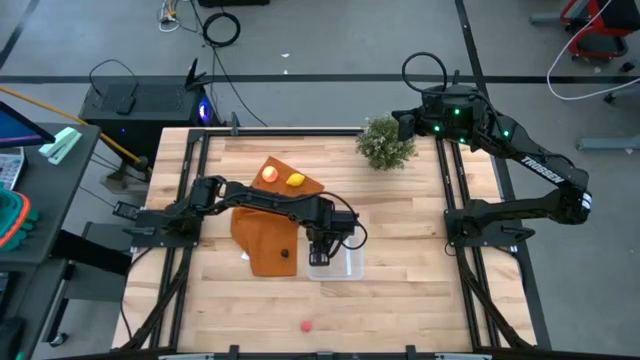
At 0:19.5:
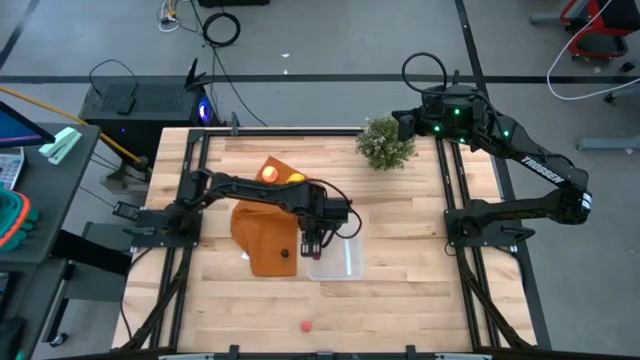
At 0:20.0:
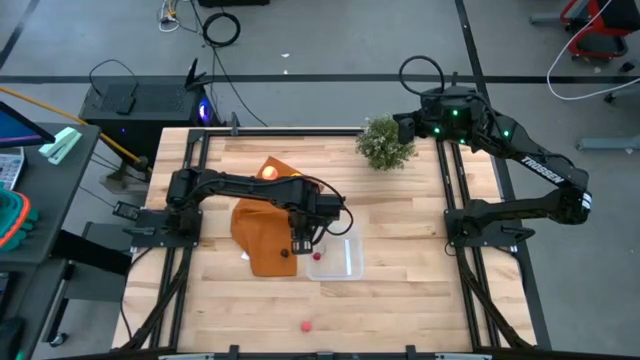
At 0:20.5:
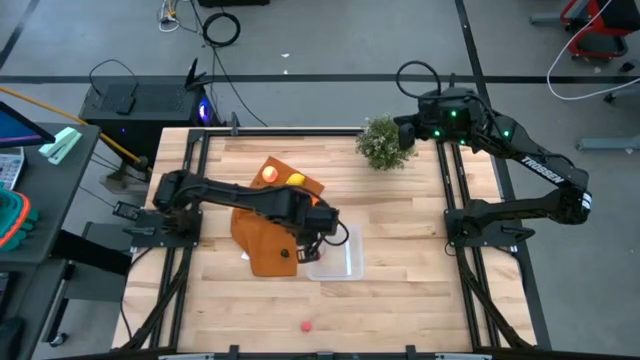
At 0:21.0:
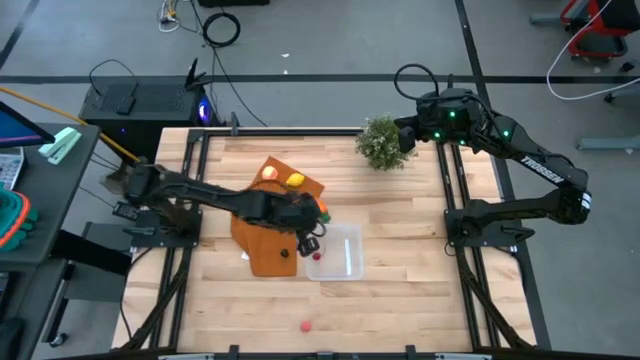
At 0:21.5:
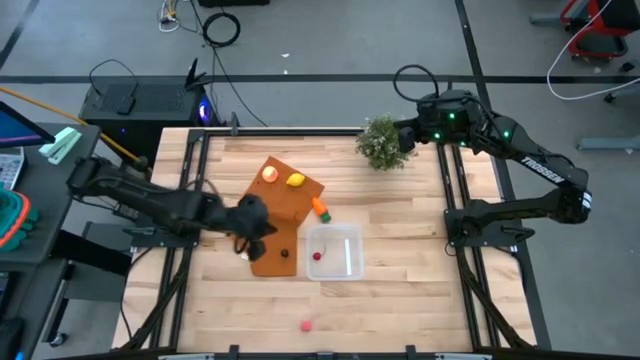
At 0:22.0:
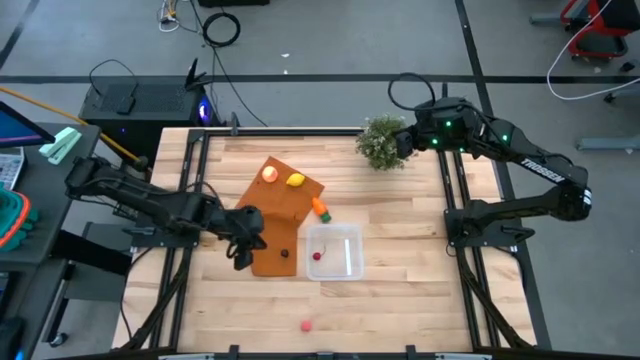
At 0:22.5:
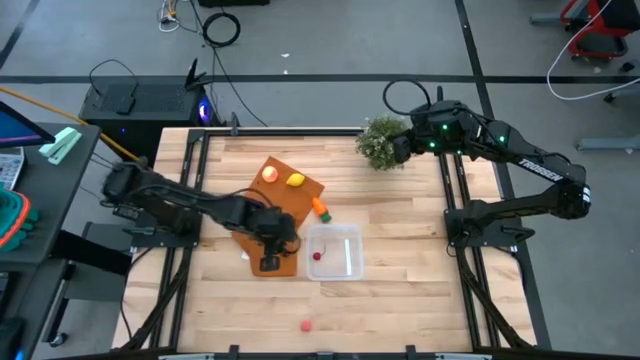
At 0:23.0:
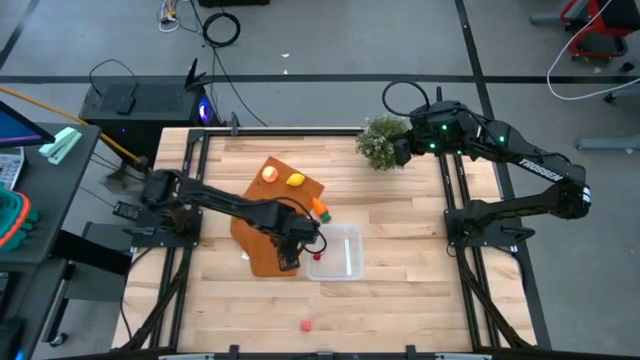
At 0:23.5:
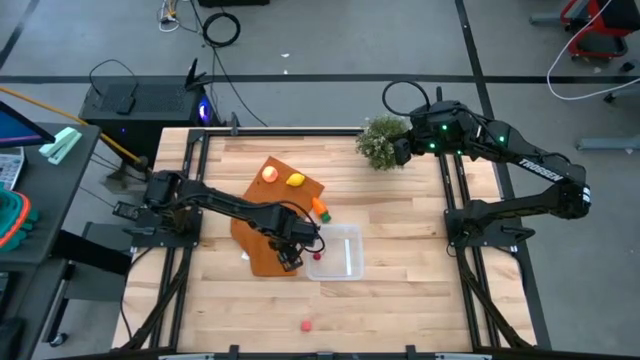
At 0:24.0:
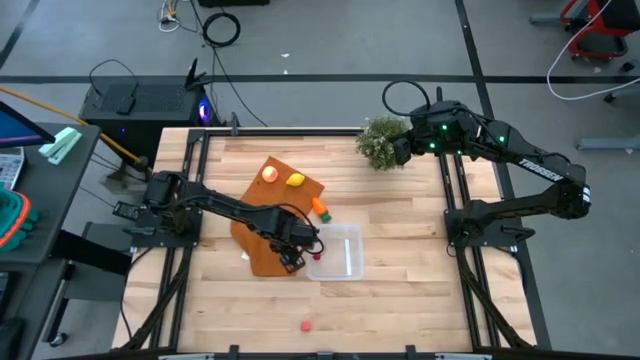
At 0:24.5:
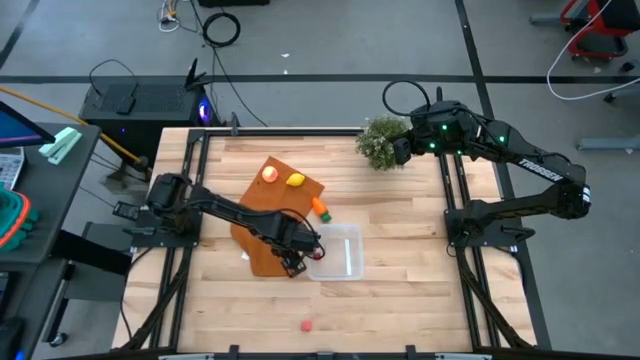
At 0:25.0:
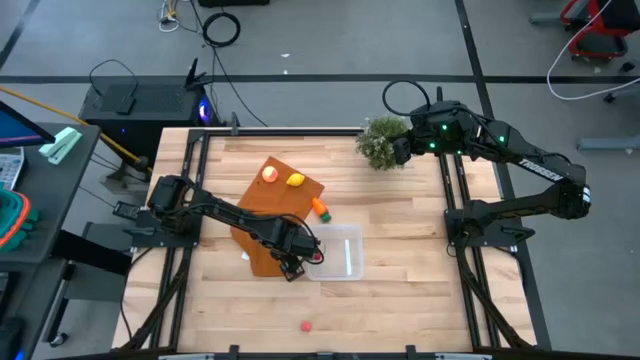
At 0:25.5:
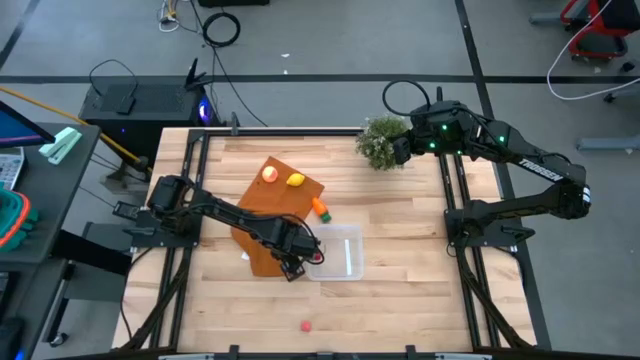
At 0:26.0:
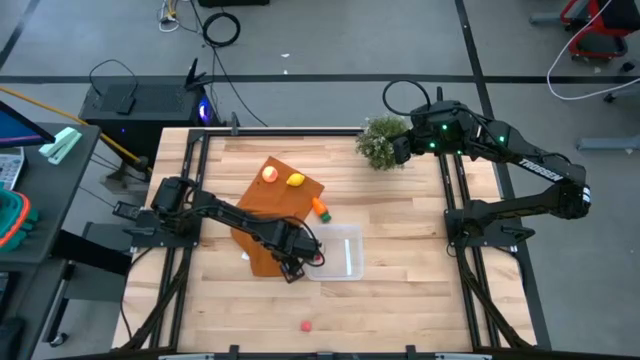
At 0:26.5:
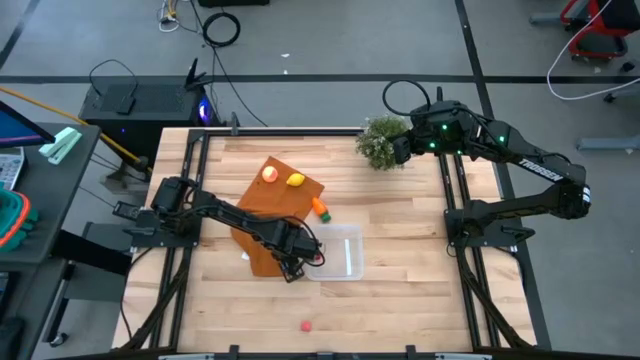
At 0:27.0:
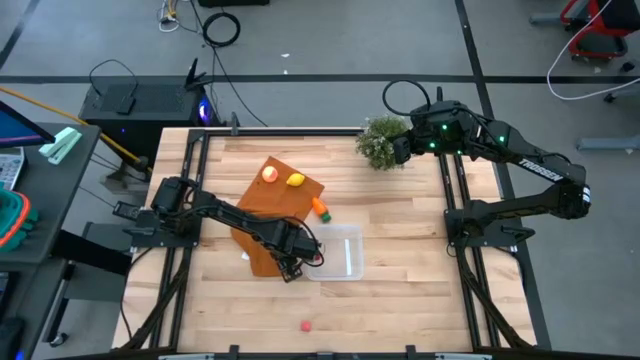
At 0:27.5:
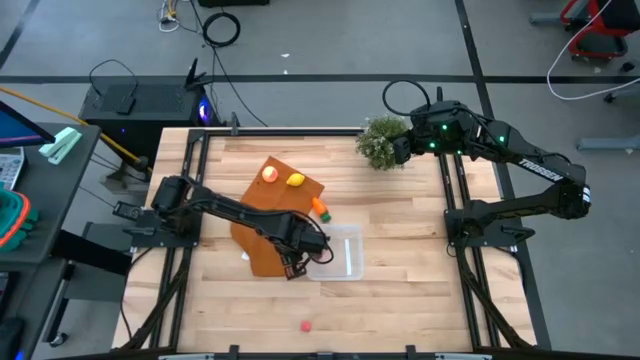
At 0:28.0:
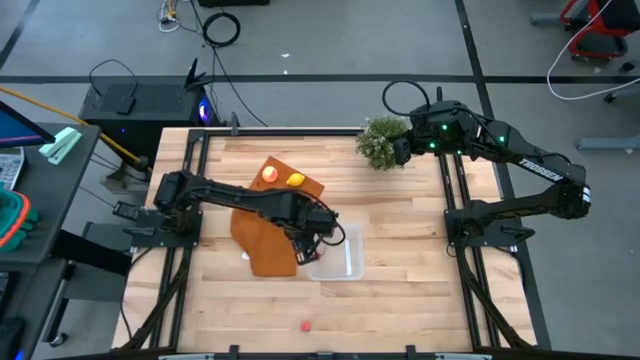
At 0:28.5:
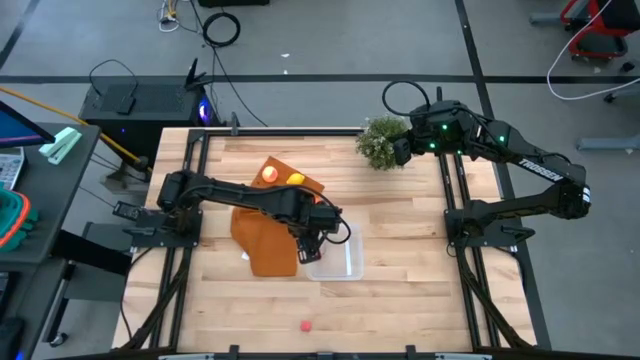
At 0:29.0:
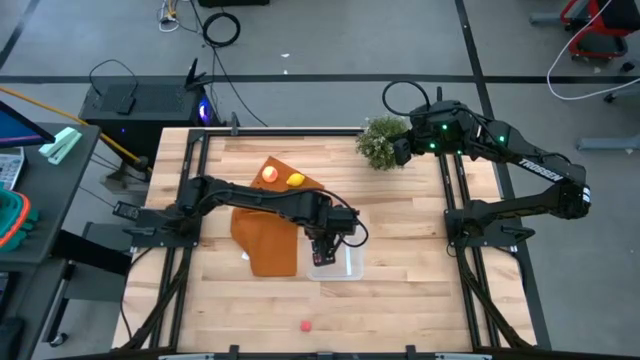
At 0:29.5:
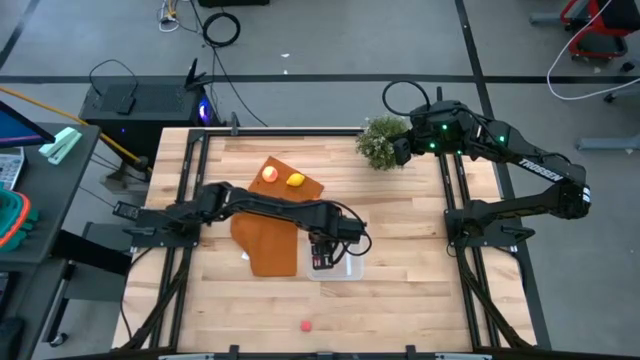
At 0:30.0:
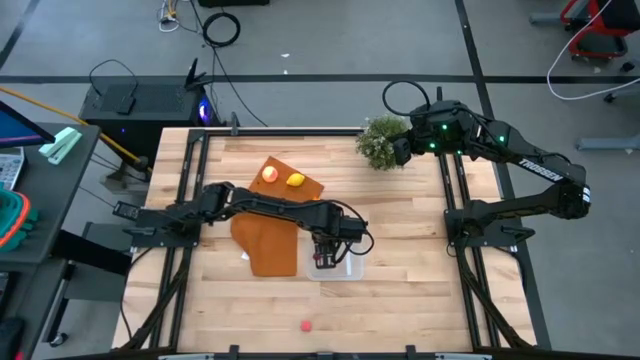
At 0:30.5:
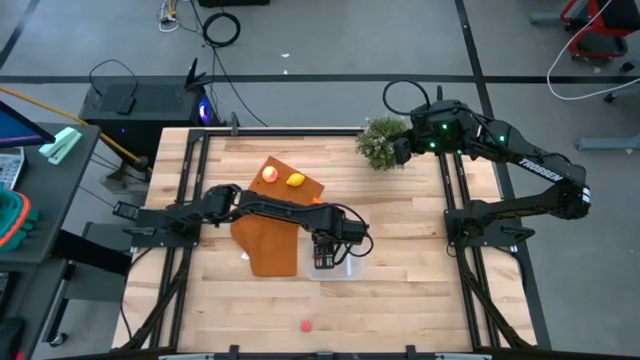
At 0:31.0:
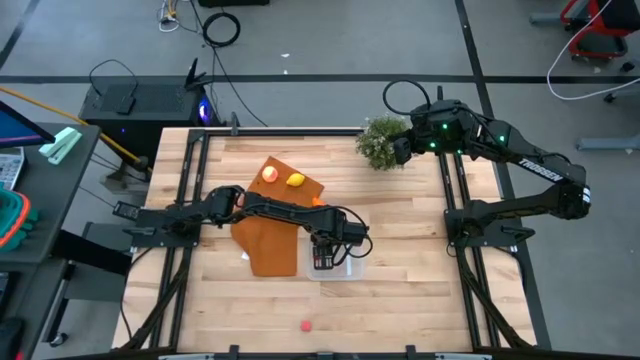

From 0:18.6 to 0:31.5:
Task: Pick and placing Produce into tupperware
Put the black cherry into the transparent bin

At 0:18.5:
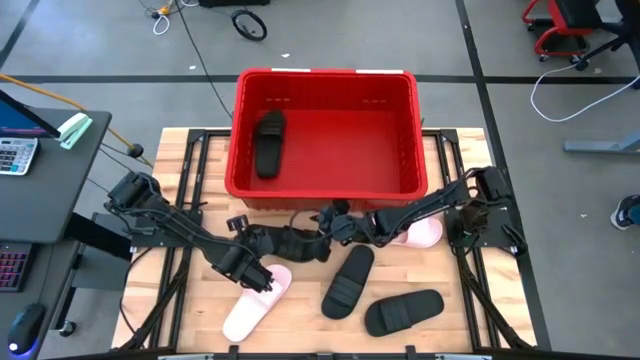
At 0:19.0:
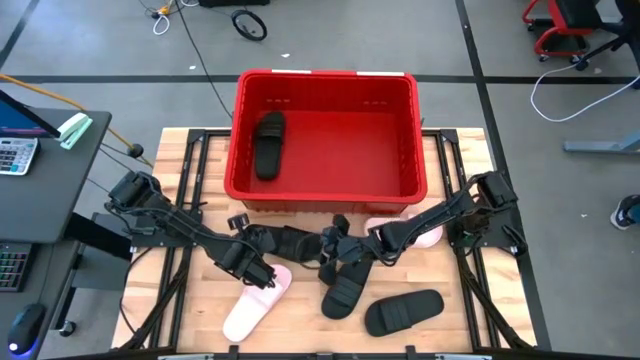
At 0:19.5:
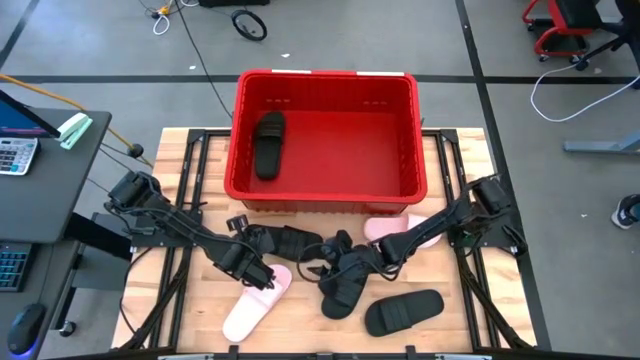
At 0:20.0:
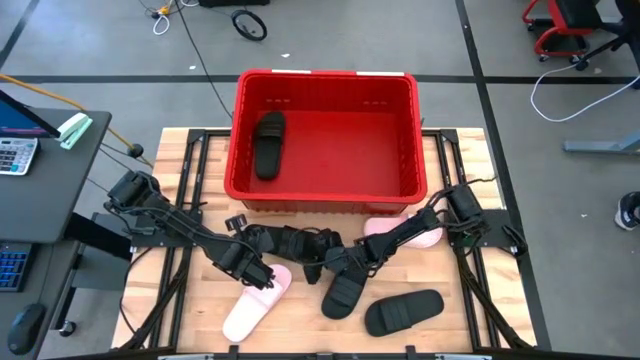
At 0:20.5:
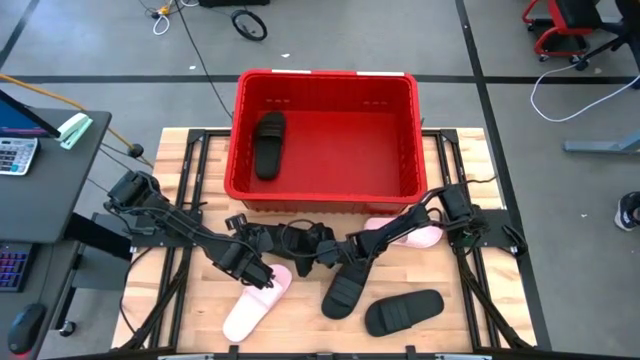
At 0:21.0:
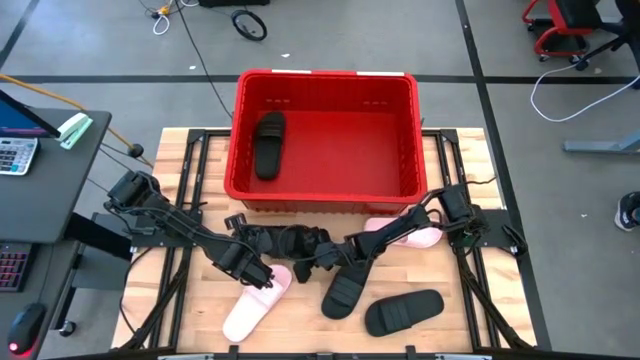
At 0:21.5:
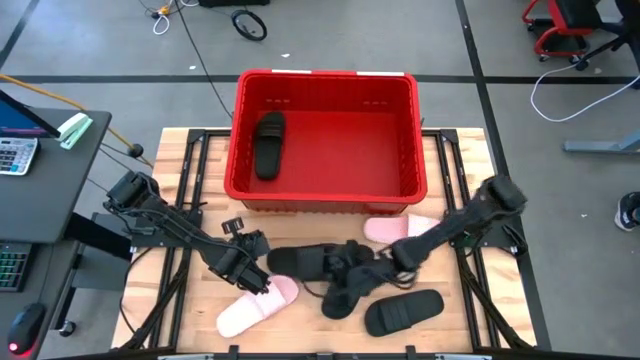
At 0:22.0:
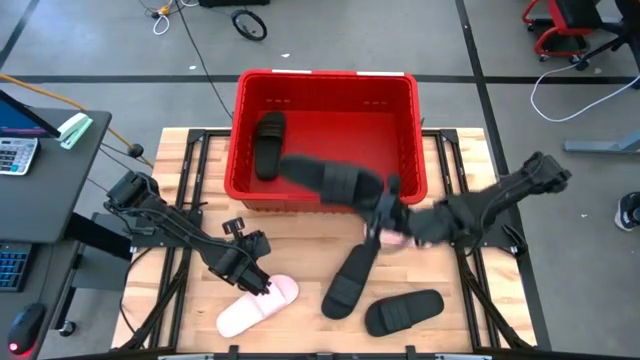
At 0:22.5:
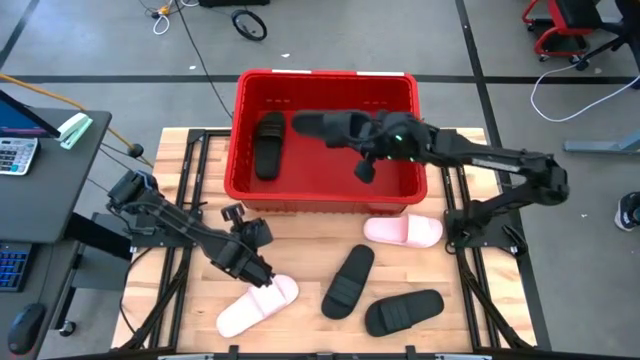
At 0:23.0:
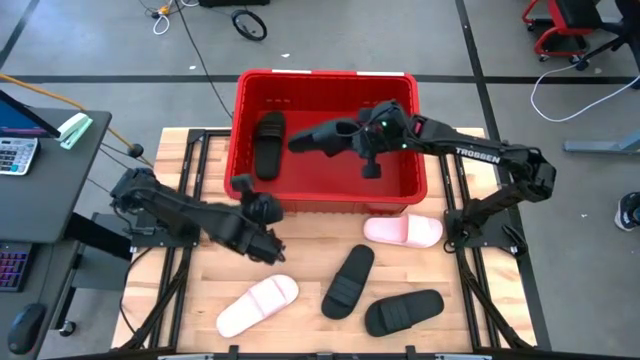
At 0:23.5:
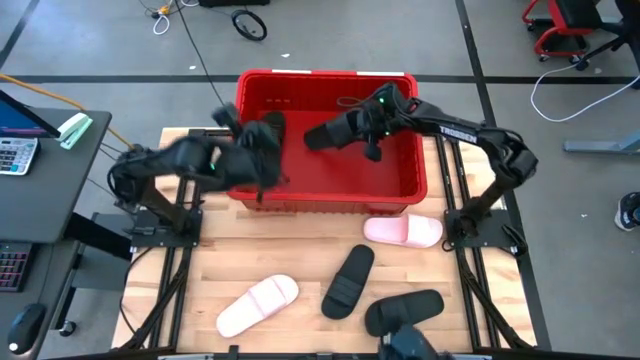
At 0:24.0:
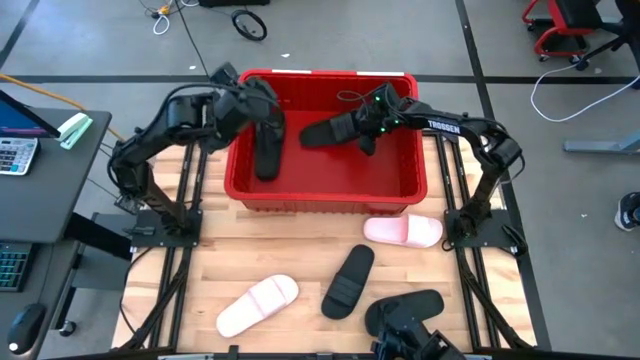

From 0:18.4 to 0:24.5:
Task: Pick and place slides into bin
Put the black slipper into the red bin

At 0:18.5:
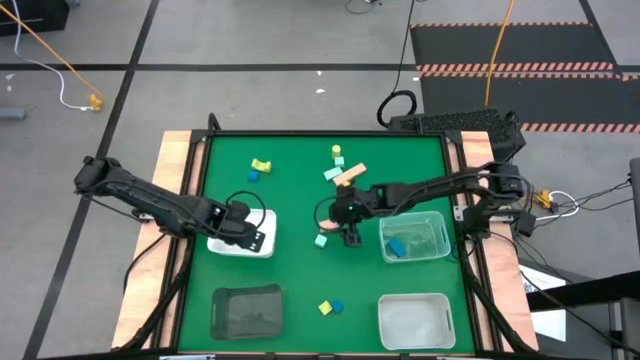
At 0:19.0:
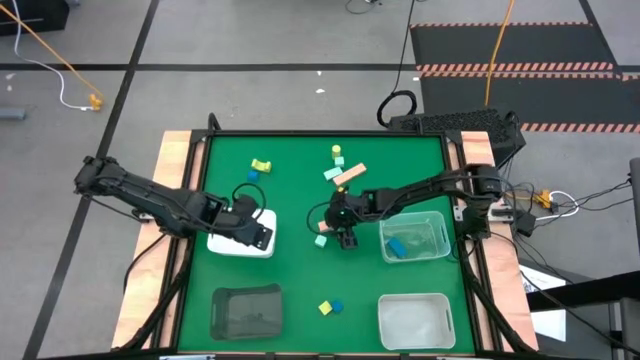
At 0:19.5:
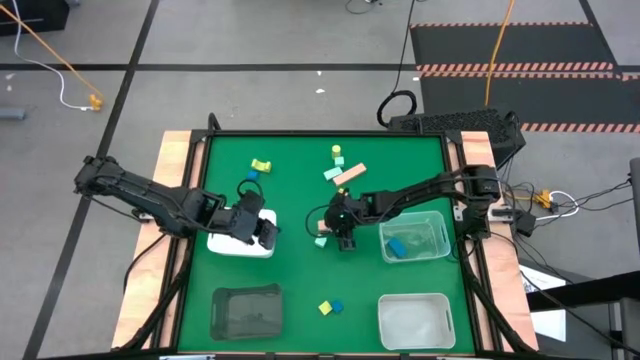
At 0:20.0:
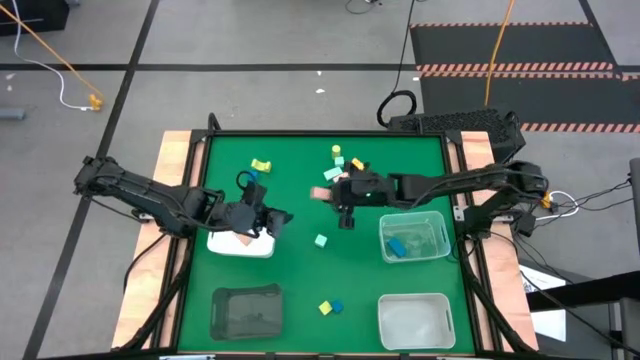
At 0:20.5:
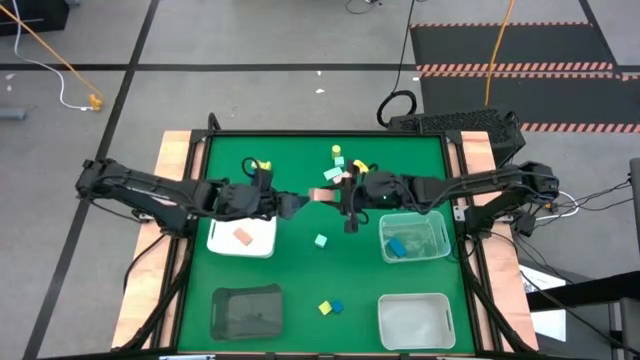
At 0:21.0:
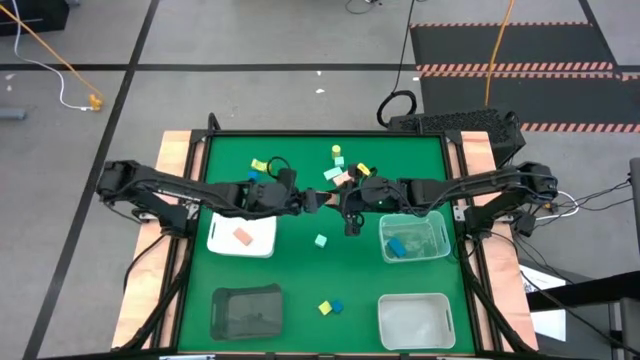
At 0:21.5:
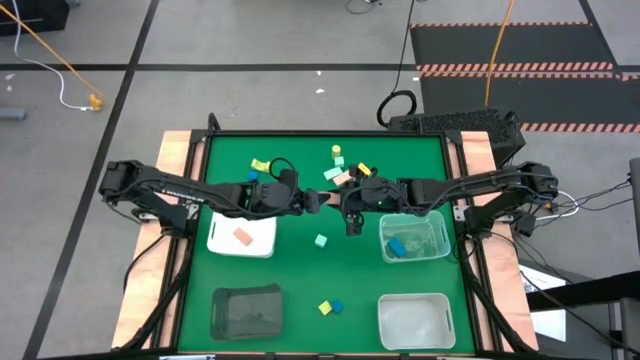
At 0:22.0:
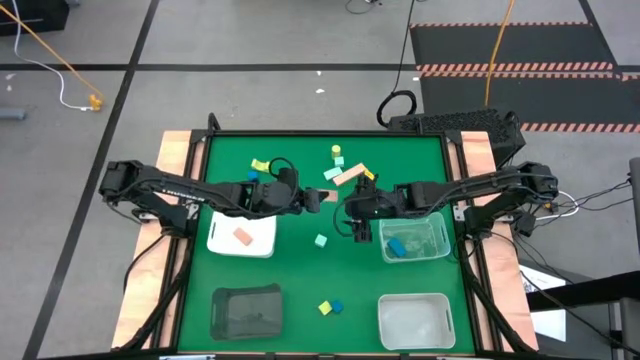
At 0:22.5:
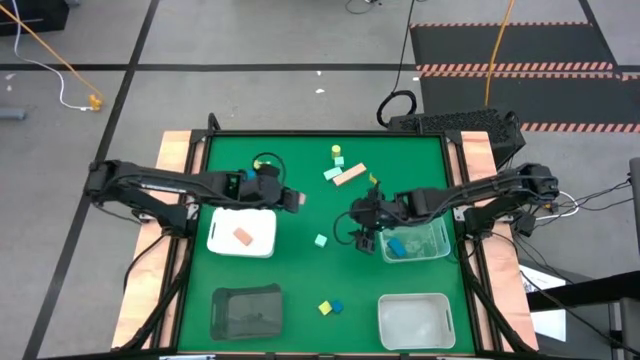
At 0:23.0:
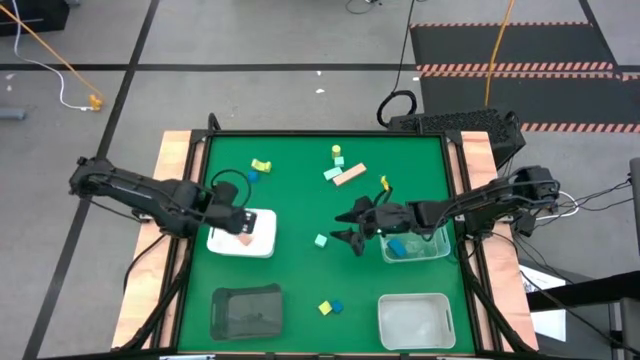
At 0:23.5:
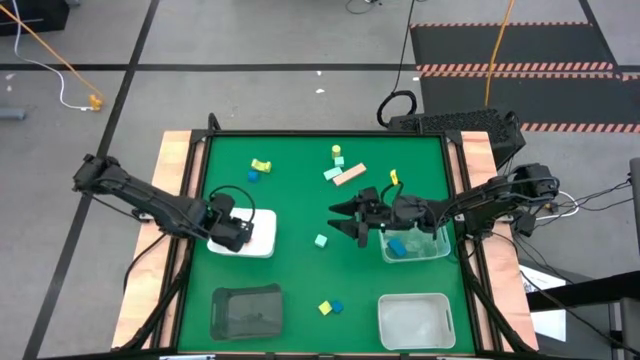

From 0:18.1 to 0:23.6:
Task: Sort & place blocks by color
Put the bottom light brown block into the white bin
